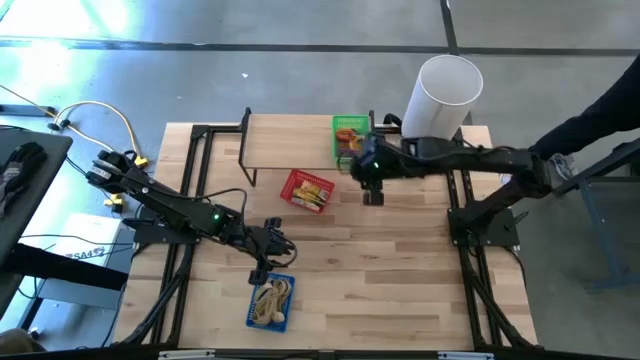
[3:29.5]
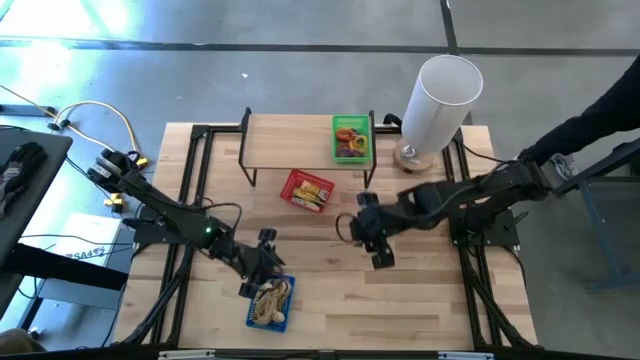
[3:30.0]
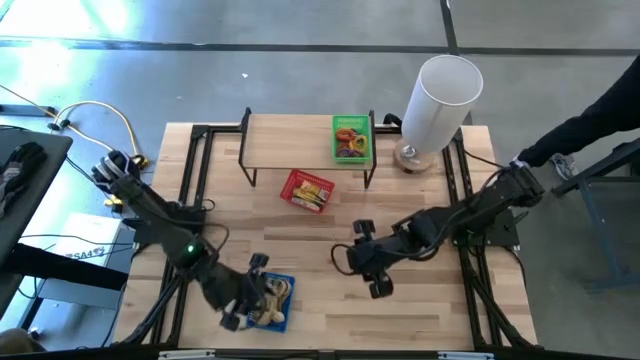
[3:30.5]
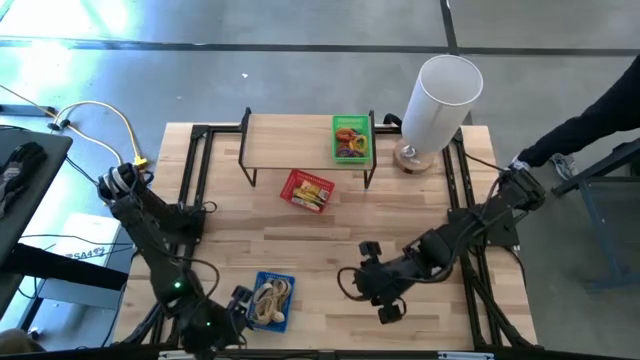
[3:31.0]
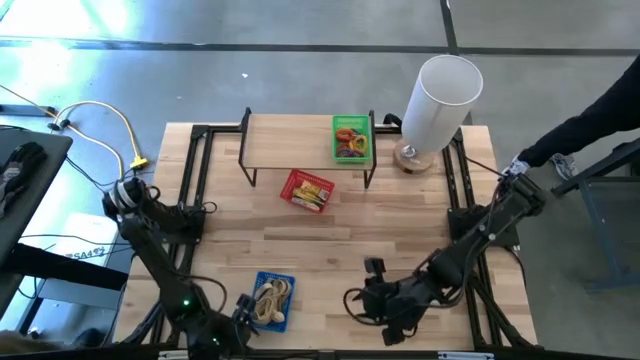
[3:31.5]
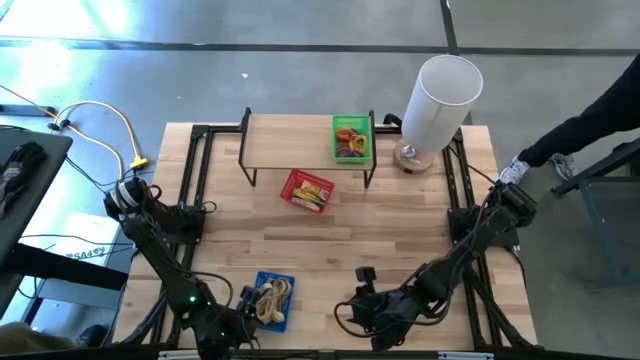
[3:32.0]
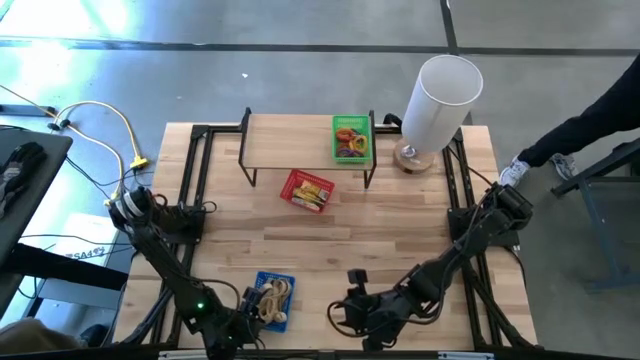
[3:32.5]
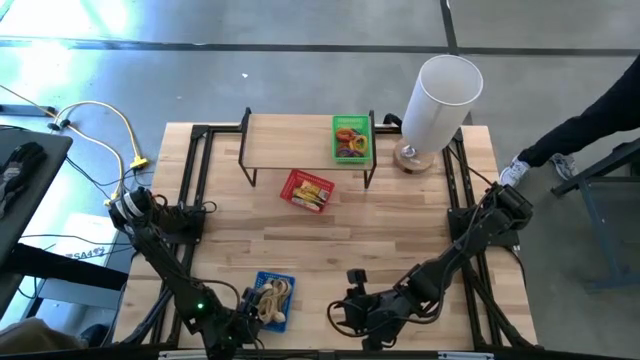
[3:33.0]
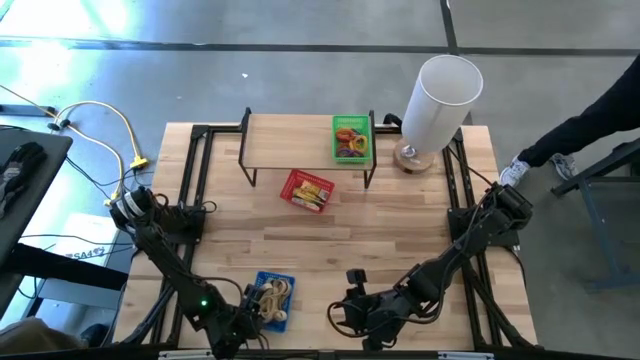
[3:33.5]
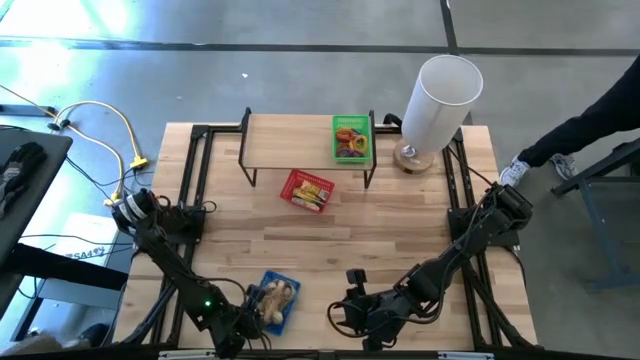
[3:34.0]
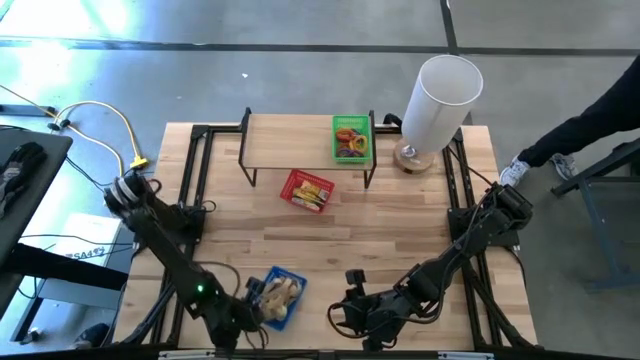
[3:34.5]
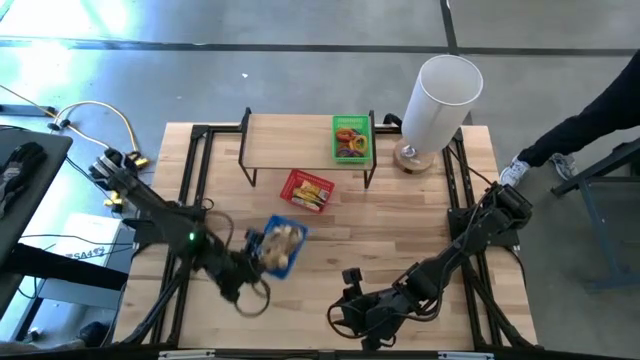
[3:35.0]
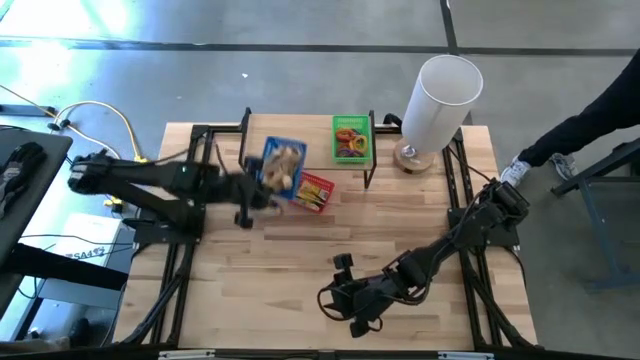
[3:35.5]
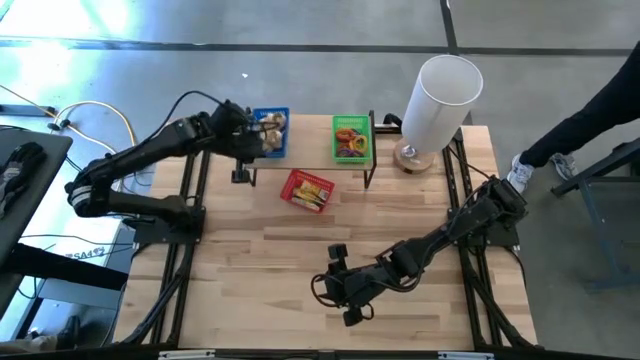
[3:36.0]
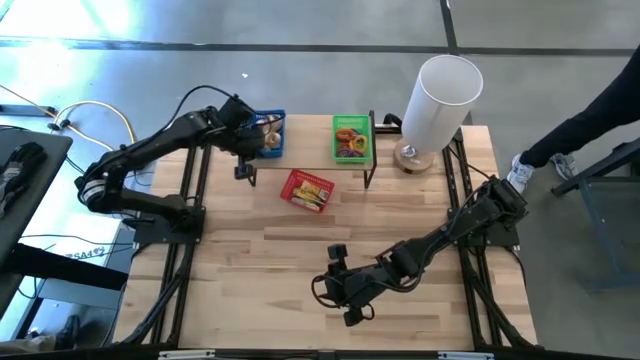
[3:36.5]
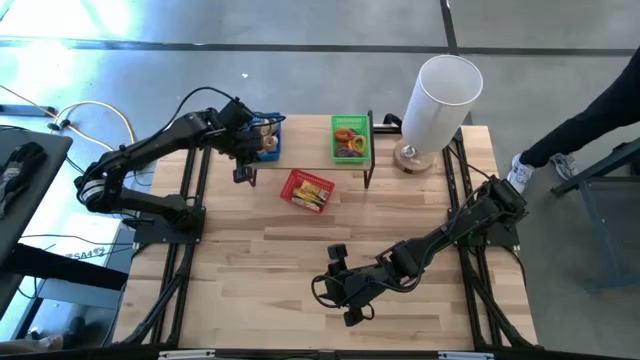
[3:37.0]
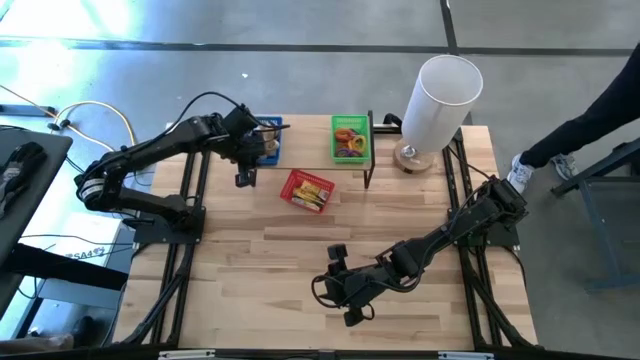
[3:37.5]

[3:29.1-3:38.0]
Task: Pick & Place Office Desk Supplies
Put the blue bin on the shelf

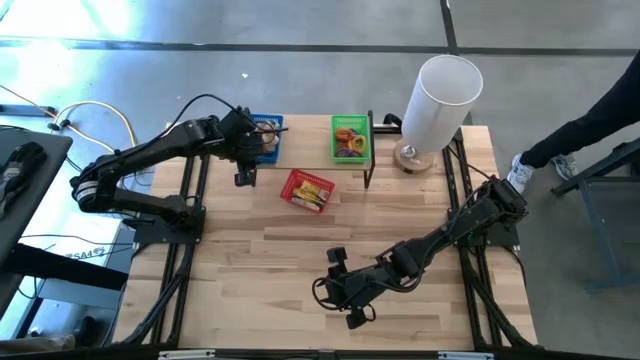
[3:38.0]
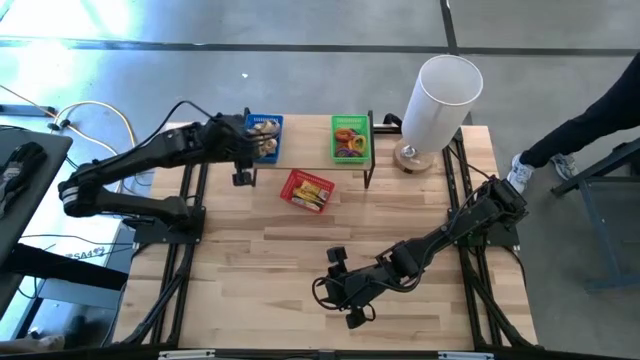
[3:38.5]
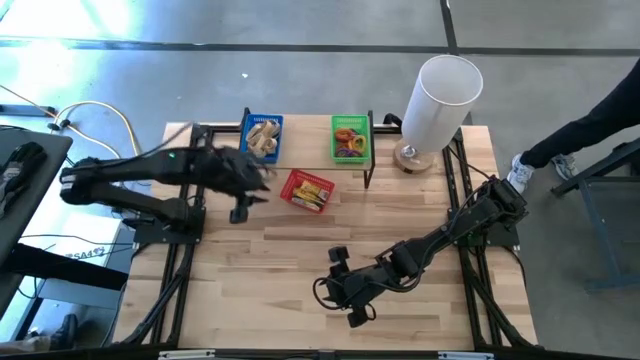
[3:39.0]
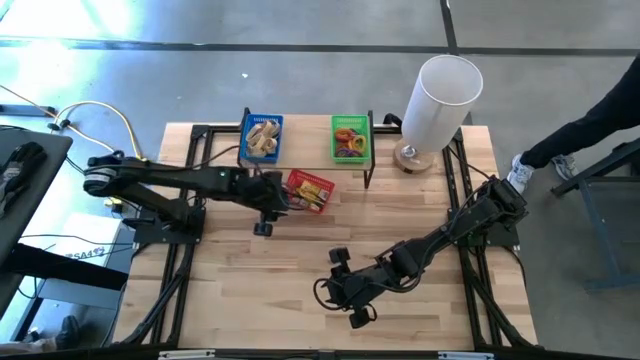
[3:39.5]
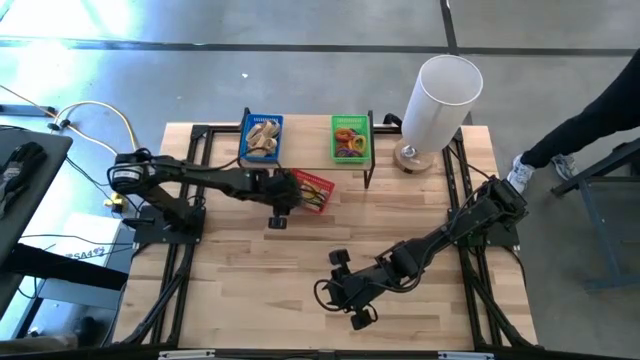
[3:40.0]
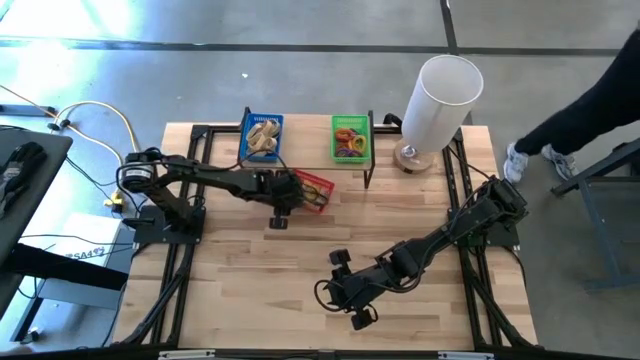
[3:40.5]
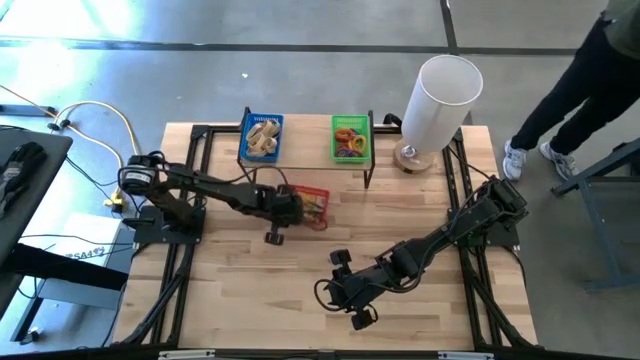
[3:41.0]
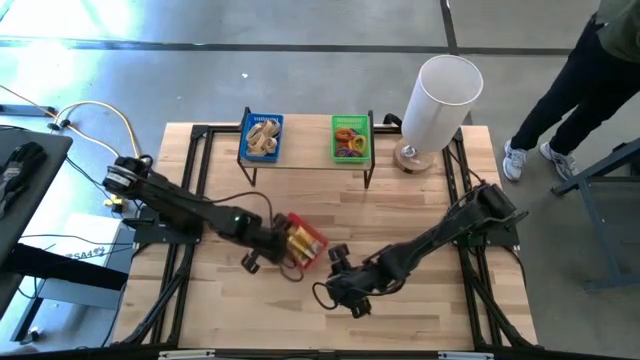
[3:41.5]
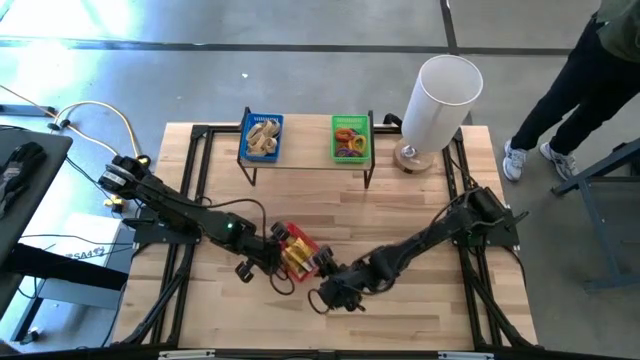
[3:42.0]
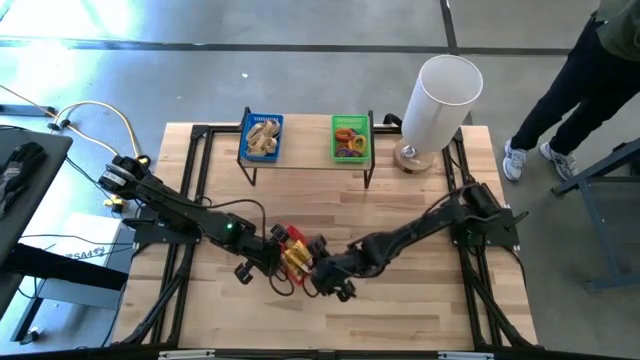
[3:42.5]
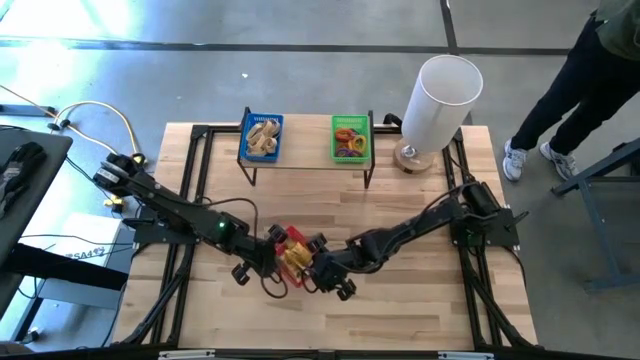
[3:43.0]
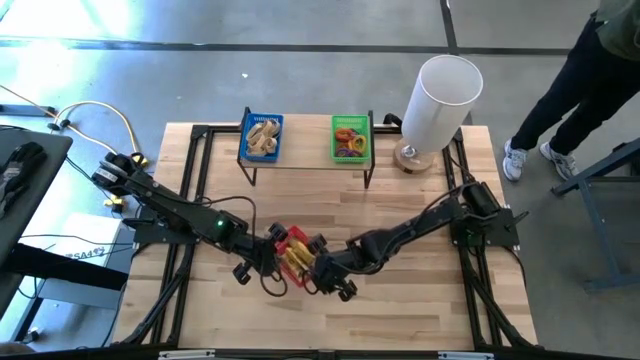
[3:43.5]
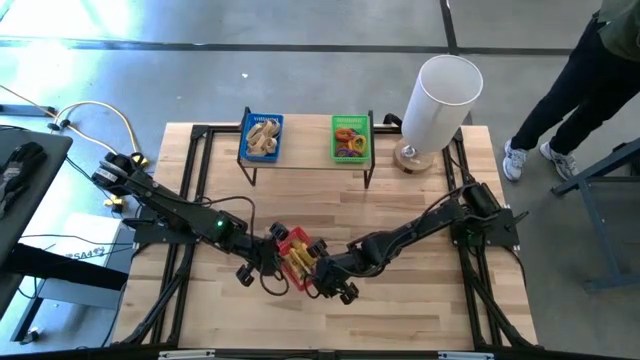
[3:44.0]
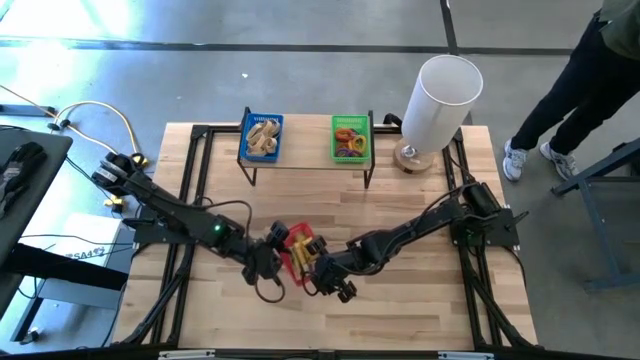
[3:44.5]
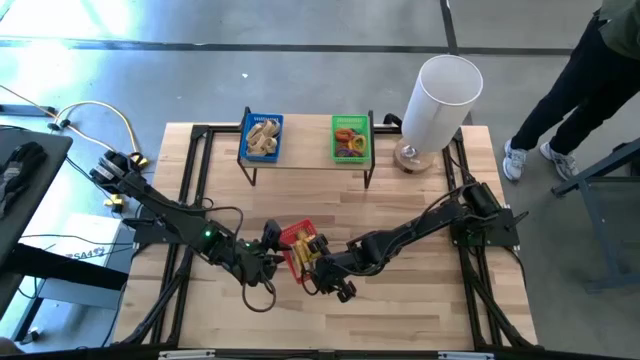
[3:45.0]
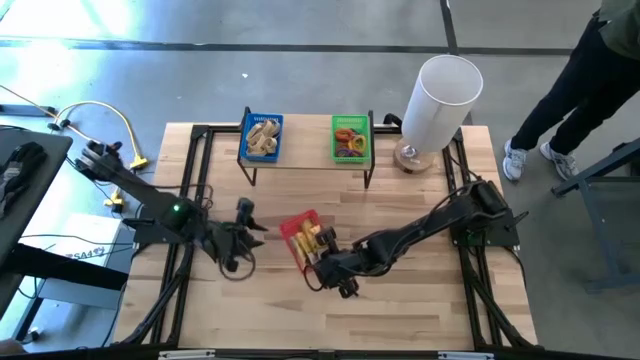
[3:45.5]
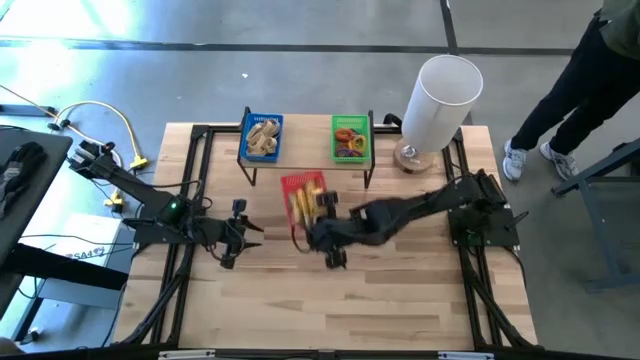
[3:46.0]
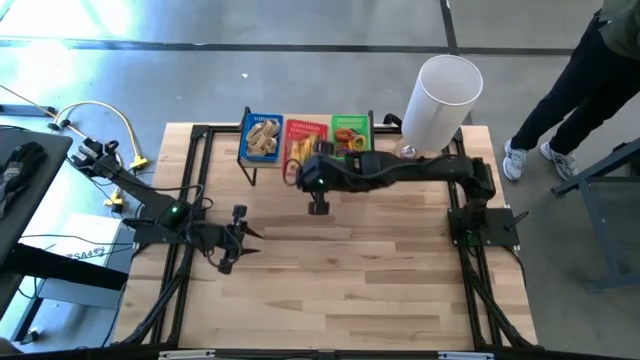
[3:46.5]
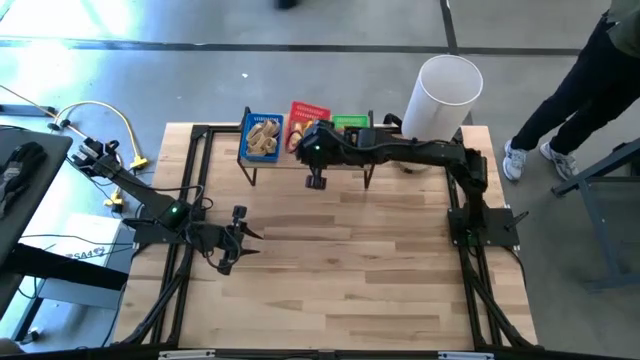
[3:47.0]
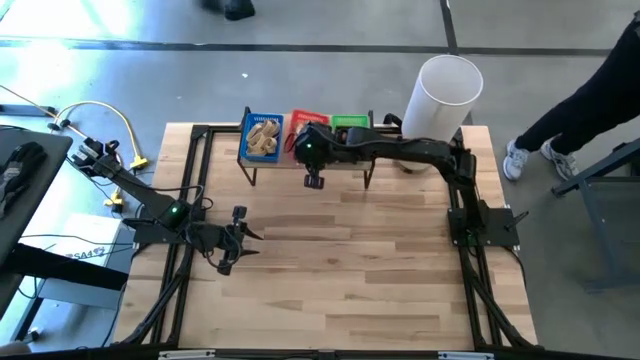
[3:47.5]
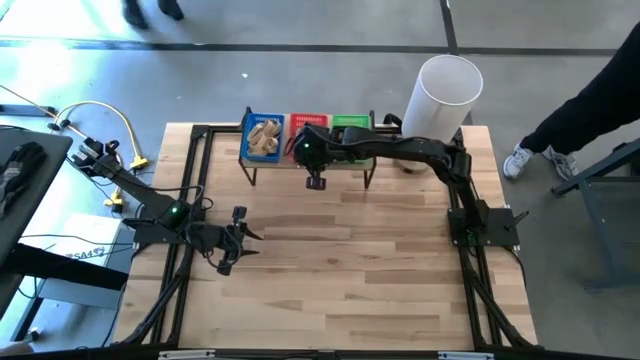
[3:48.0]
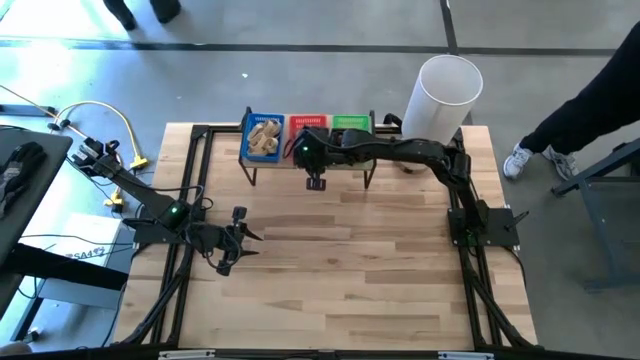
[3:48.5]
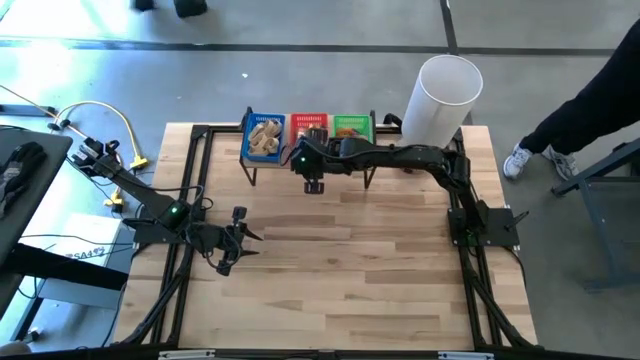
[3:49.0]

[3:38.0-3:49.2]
Put the red bin on the shelf
